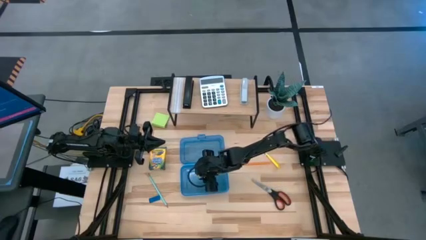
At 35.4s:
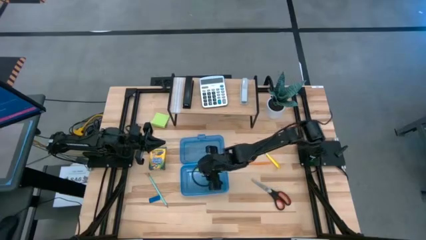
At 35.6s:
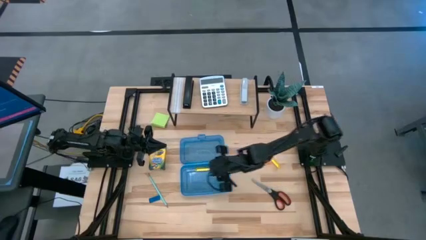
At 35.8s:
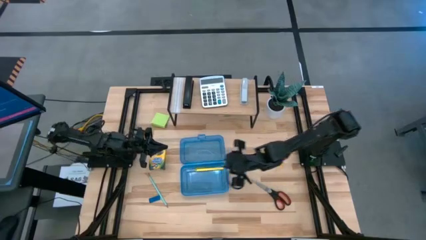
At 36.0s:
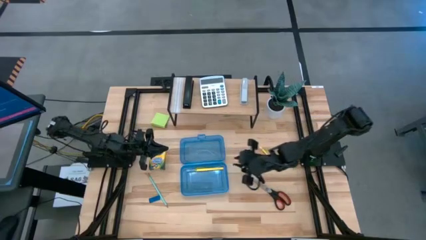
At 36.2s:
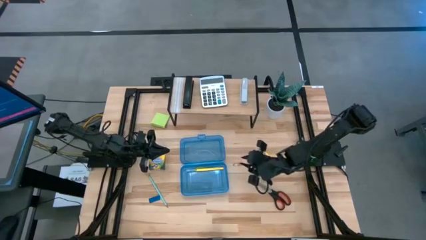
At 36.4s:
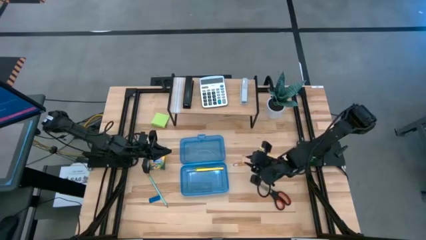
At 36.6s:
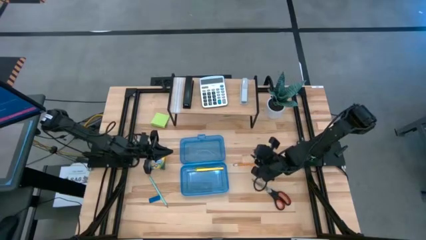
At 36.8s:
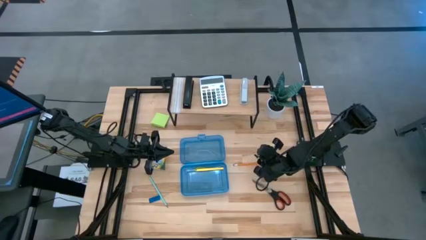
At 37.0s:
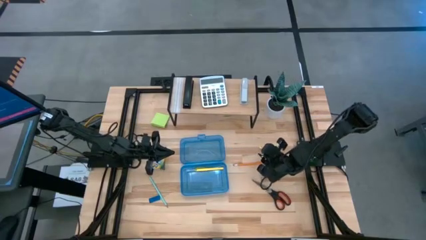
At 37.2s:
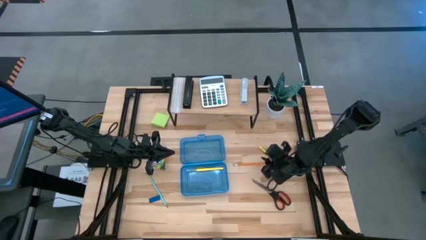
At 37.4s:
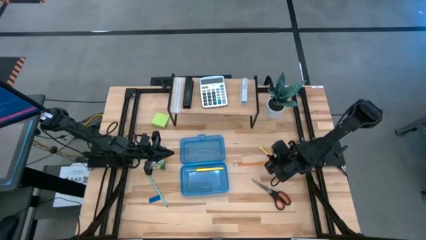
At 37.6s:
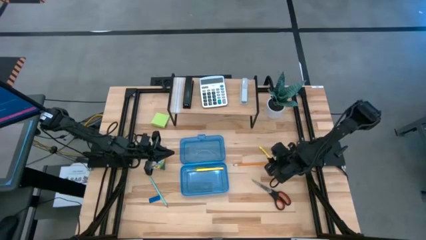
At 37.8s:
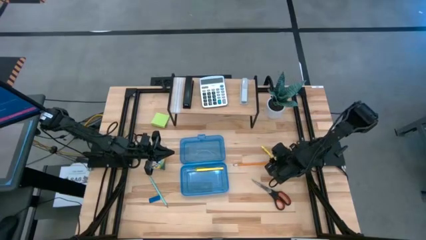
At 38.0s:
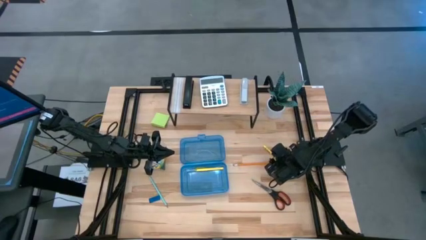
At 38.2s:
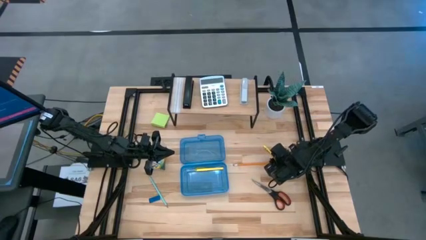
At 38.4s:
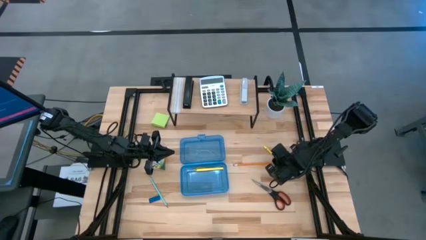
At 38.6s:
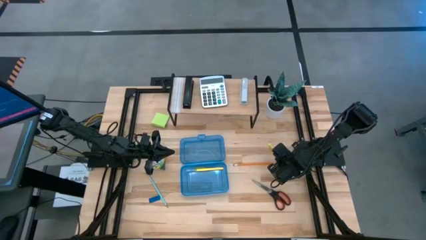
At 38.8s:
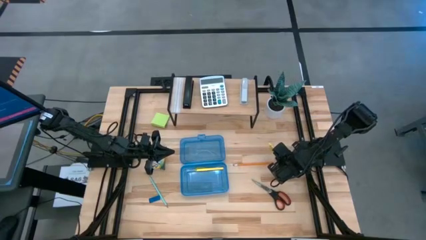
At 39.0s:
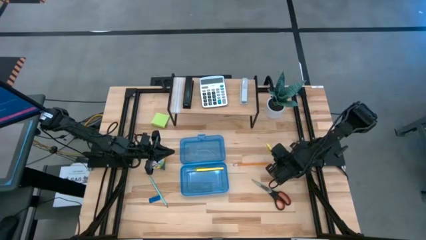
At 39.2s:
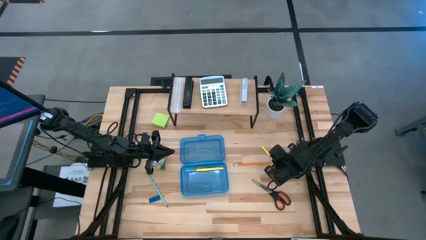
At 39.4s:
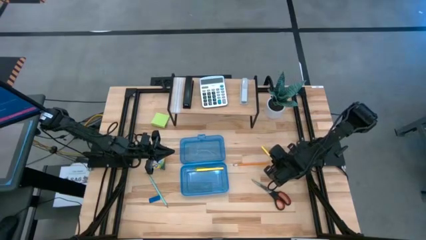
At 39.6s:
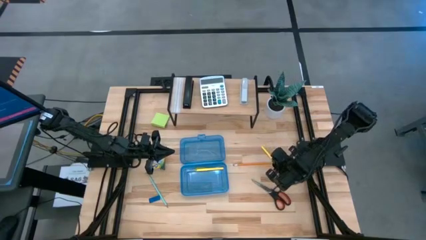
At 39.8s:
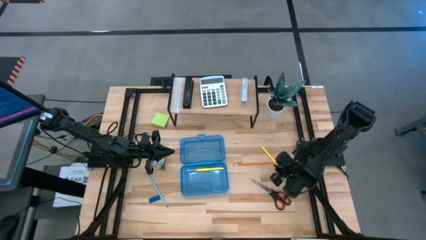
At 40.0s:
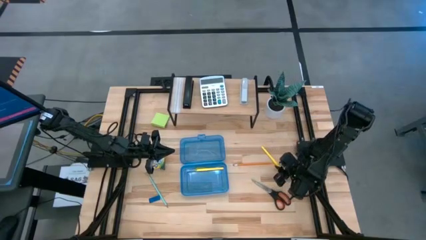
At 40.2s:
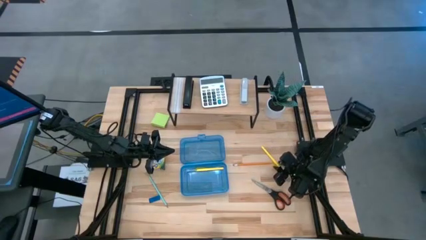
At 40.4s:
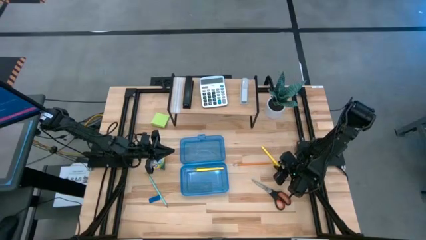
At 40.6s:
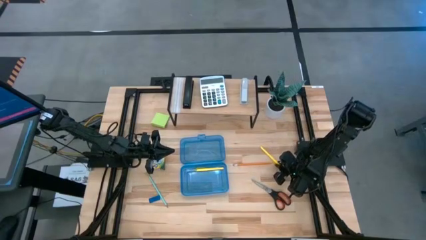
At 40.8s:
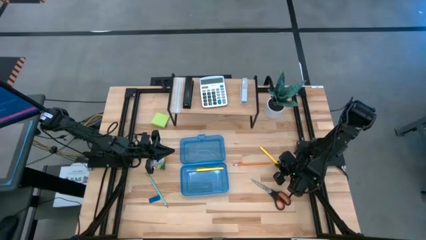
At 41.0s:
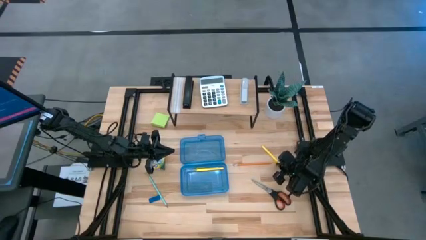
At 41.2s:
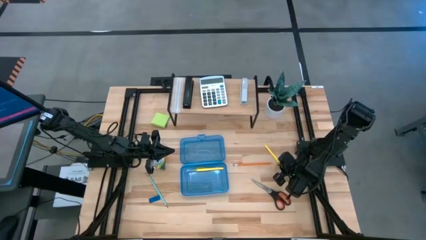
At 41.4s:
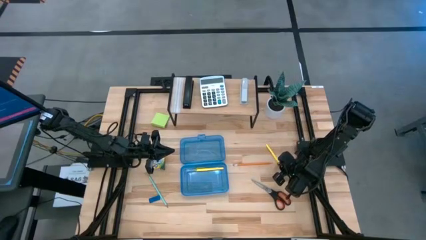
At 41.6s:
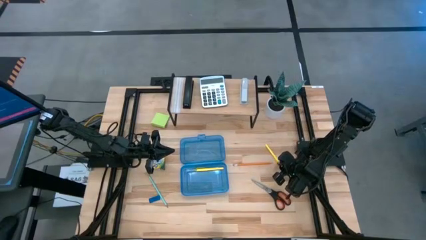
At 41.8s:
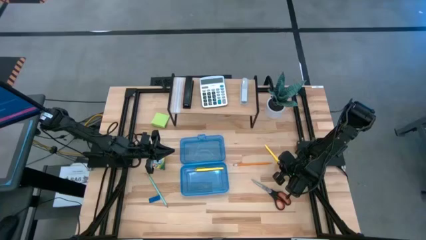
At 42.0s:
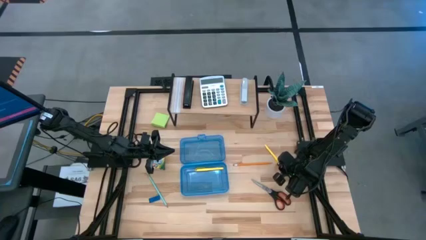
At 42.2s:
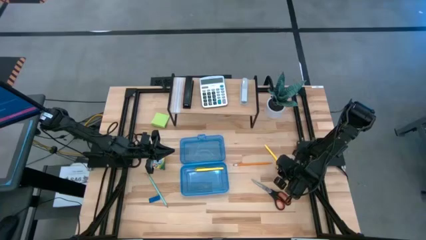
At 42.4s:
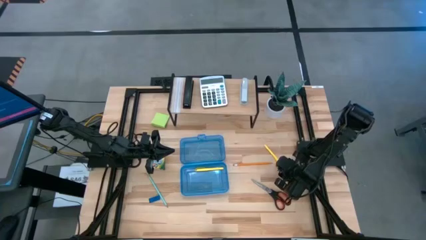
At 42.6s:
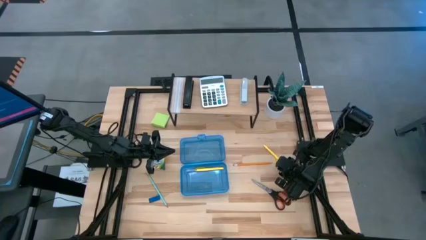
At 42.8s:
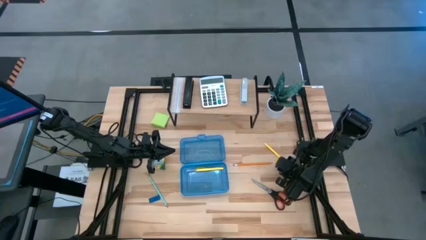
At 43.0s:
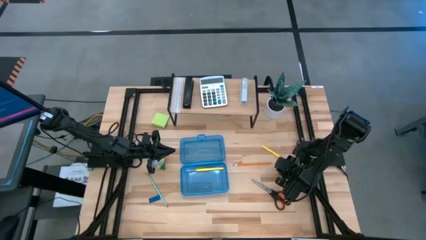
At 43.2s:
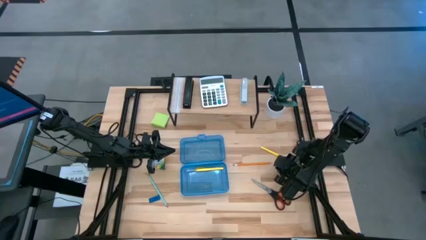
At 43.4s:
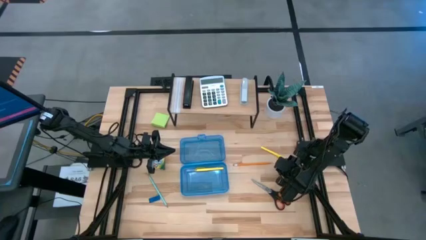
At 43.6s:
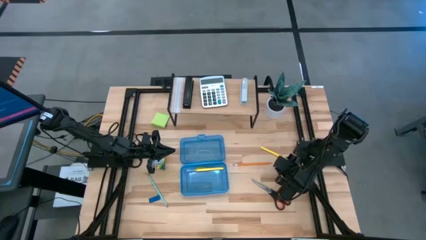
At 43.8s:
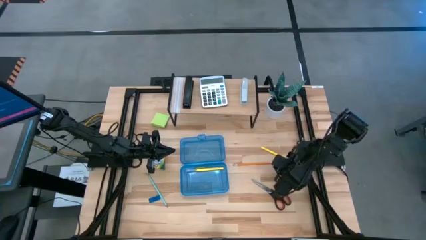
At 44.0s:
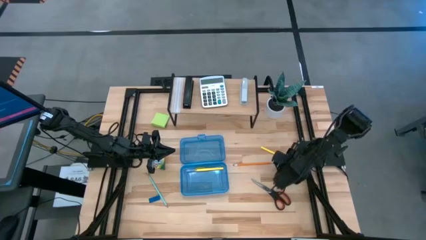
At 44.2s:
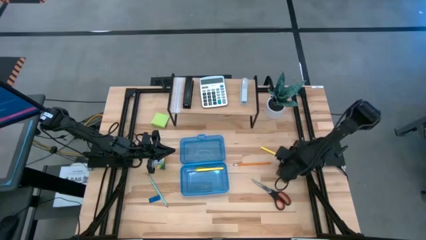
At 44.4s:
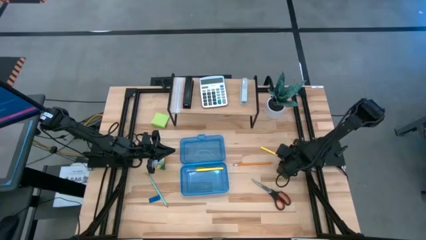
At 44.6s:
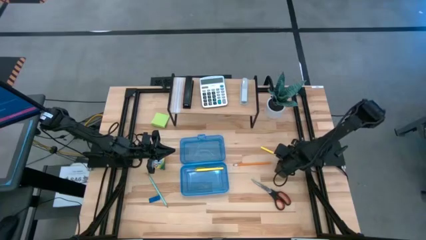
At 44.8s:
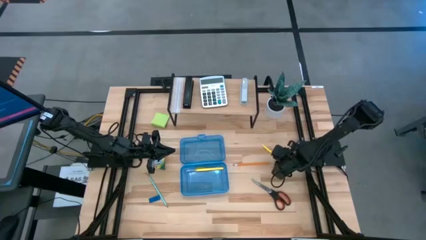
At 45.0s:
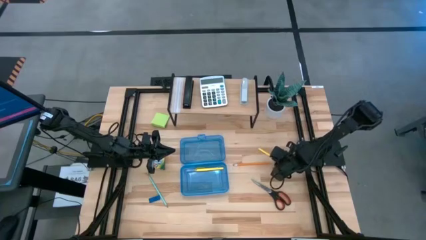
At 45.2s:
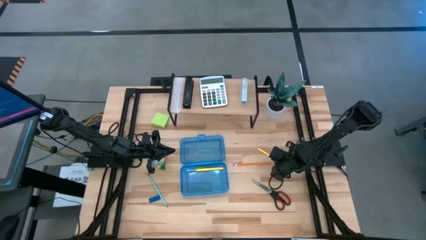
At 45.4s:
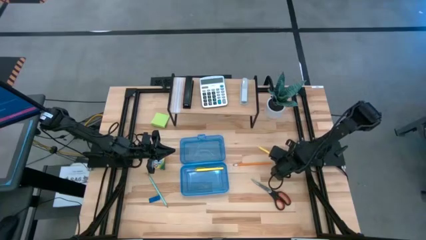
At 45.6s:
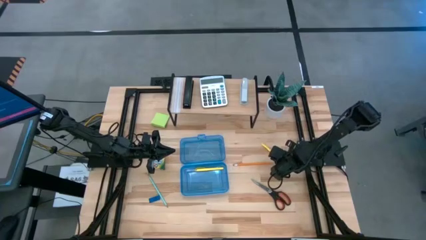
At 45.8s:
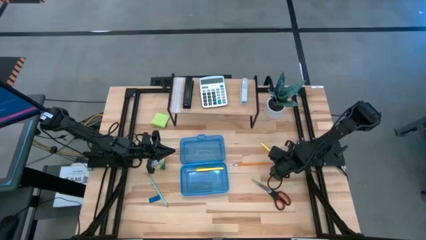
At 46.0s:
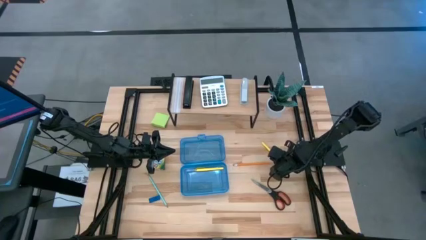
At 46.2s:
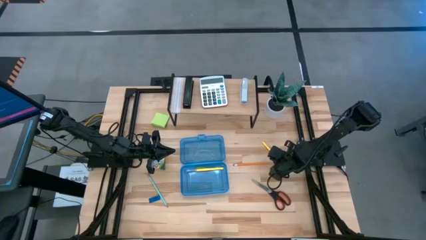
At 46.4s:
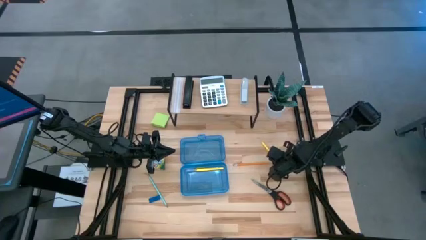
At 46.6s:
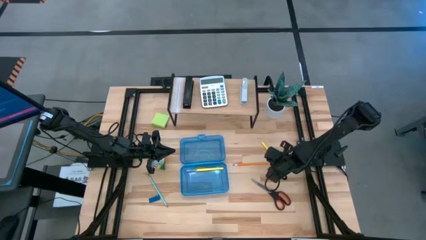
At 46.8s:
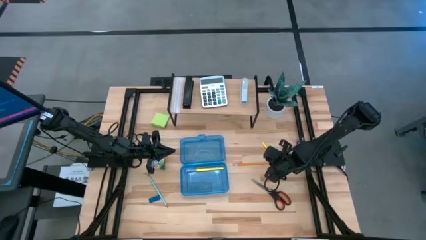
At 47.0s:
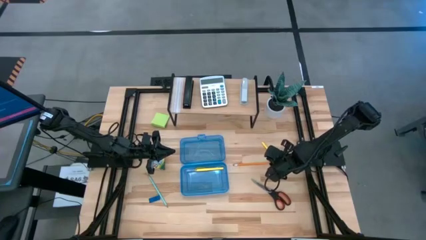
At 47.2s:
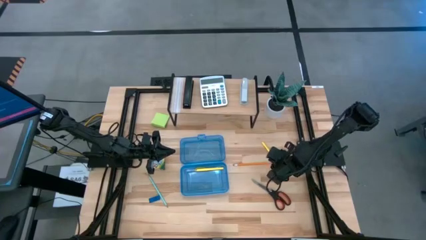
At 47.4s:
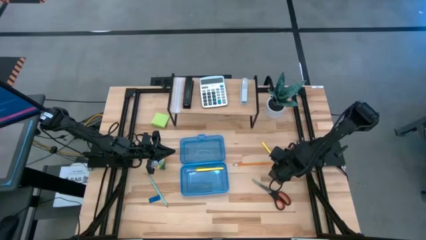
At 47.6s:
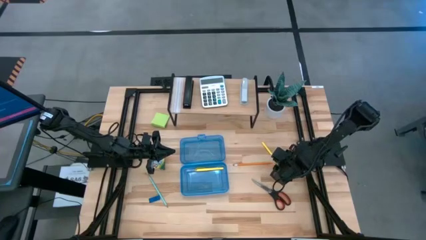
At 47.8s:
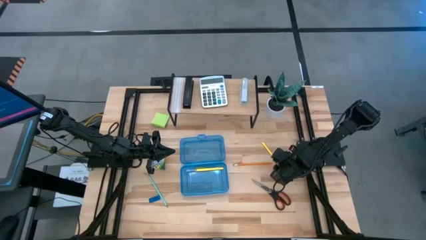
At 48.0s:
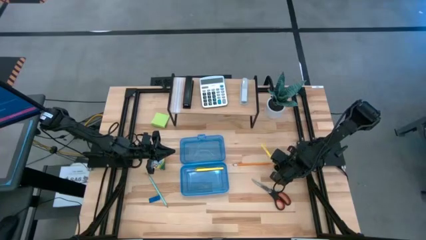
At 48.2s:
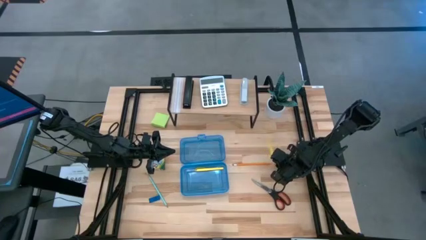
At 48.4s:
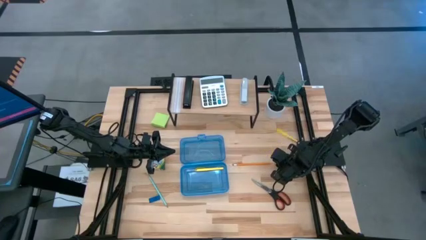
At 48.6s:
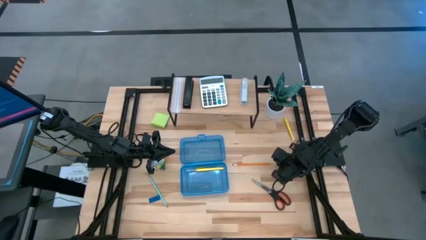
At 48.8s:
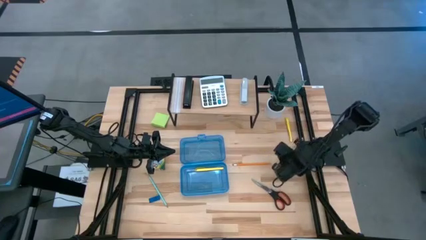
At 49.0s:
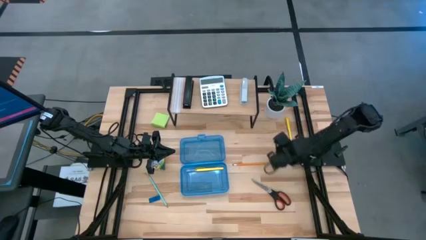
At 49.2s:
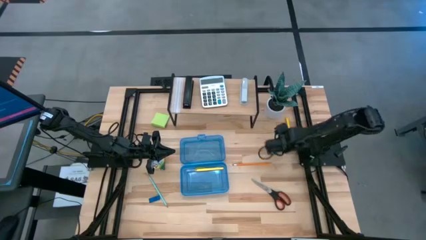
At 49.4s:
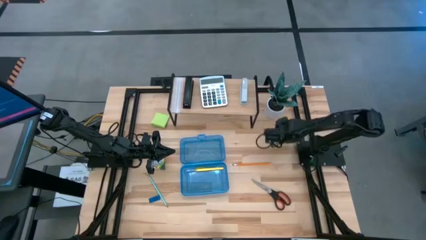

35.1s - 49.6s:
Task: Pack school essentials
Put the yellow pen into the blue supply box

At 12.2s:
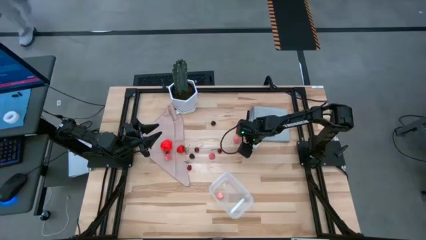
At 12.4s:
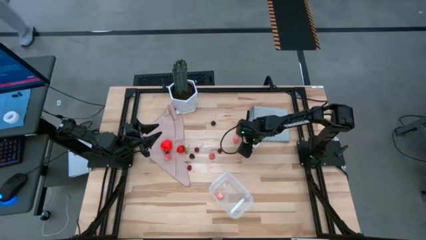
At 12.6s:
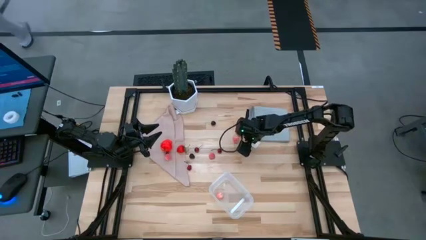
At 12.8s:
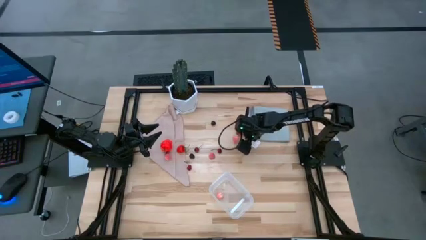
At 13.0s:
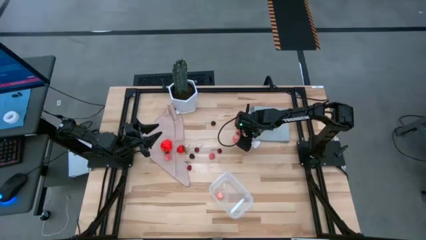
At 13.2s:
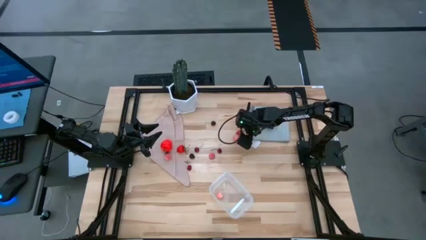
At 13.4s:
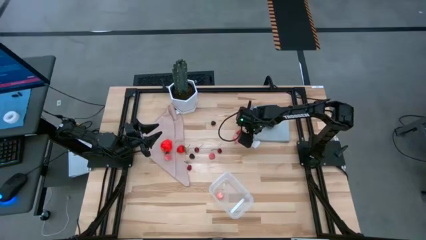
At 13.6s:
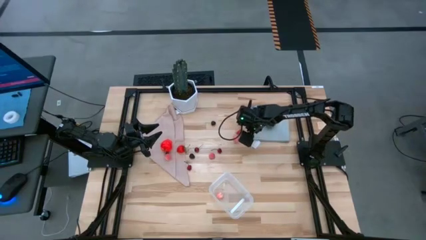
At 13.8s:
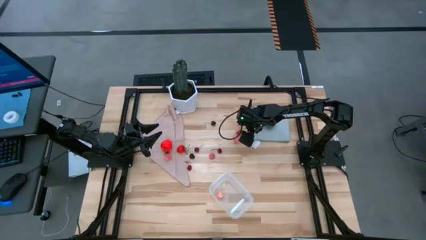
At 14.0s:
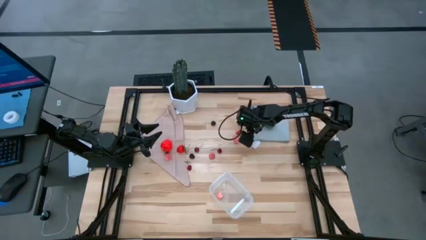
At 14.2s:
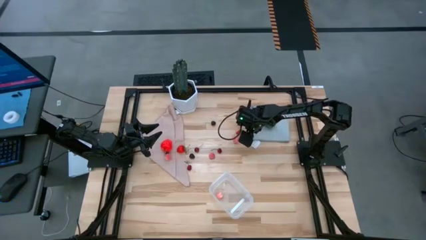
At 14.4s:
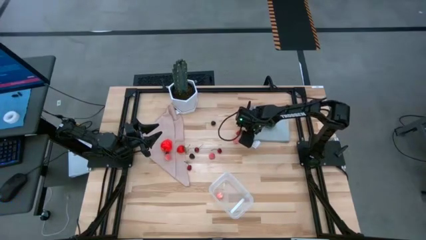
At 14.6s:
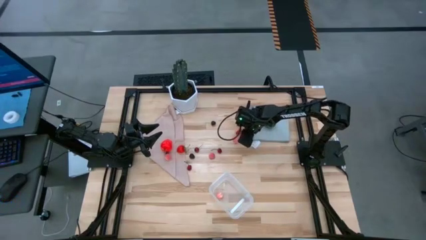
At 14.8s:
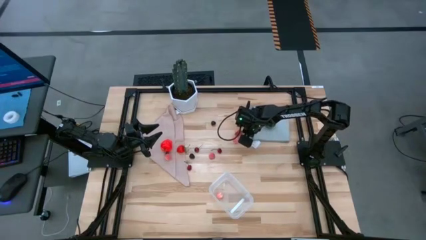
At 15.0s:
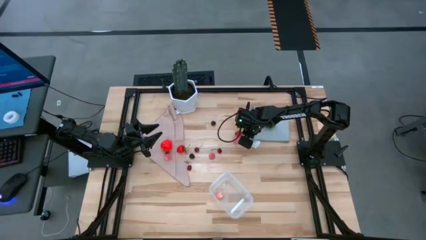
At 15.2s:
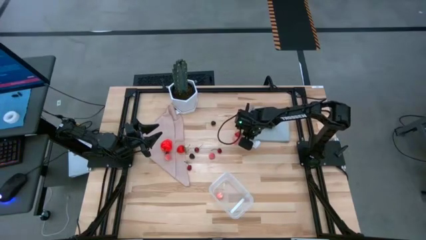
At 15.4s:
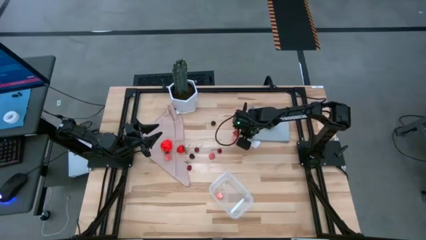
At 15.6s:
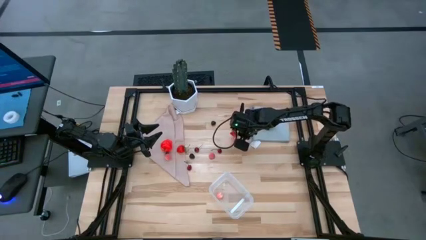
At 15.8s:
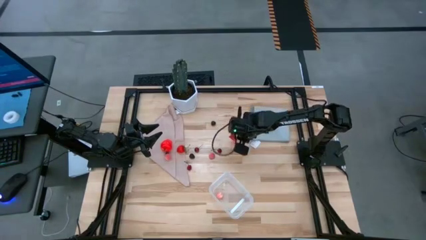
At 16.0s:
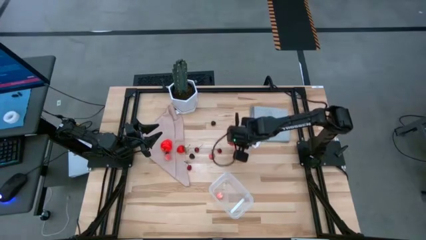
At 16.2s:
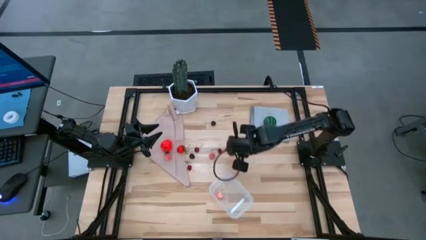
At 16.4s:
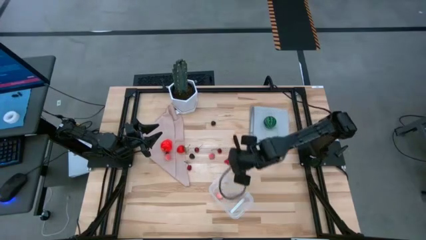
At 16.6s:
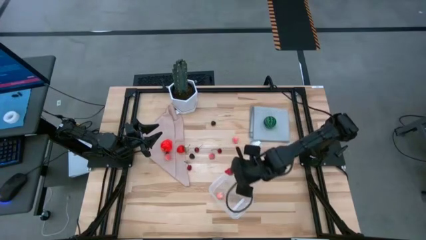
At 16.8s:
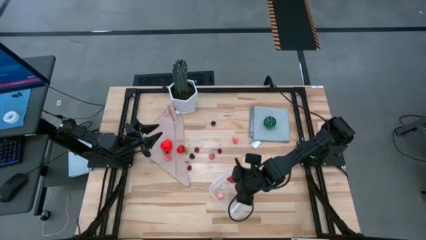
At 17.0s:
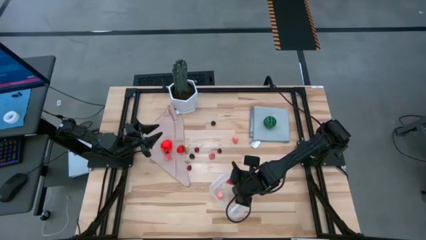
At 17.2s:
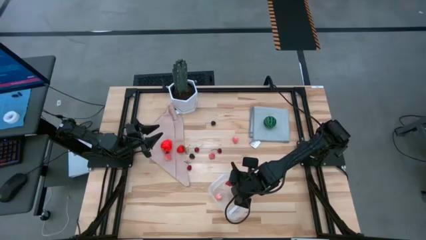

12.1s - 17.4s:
Task: Pick and placing Produce into tupperware
Put the right strawberry into the transparent bin
